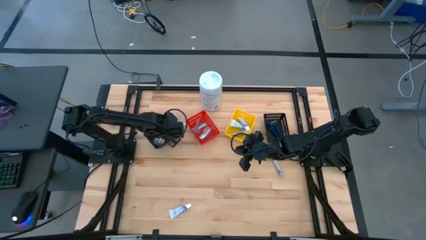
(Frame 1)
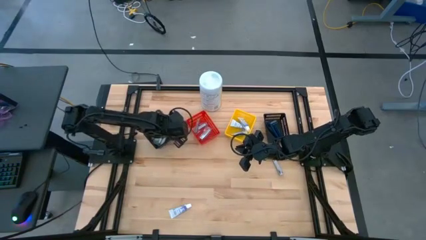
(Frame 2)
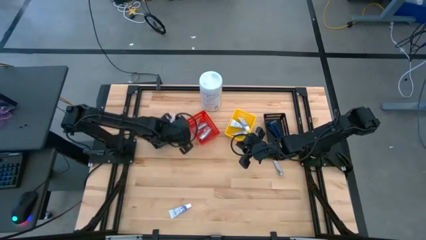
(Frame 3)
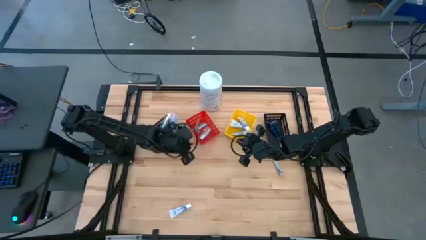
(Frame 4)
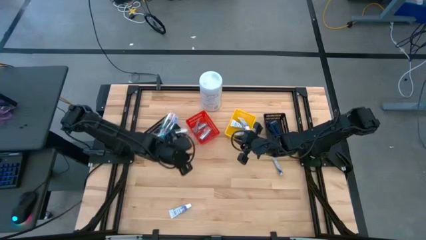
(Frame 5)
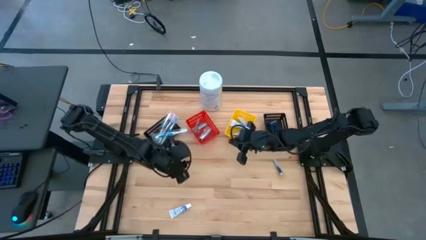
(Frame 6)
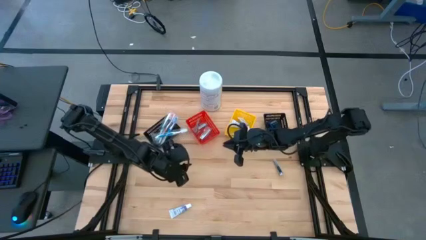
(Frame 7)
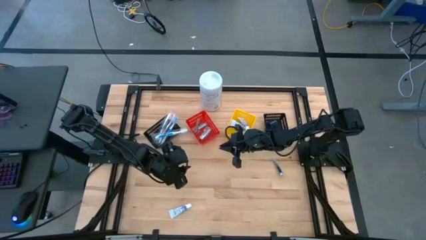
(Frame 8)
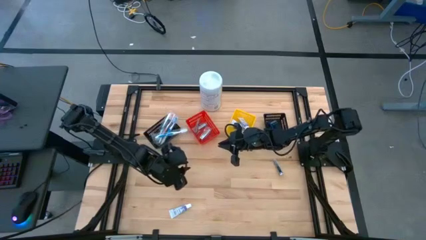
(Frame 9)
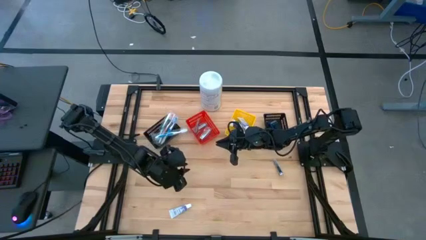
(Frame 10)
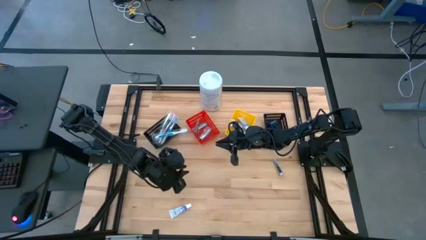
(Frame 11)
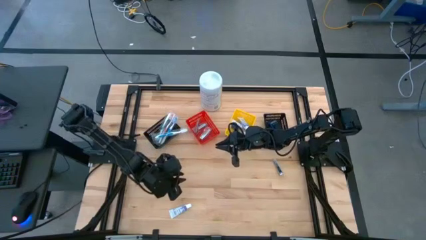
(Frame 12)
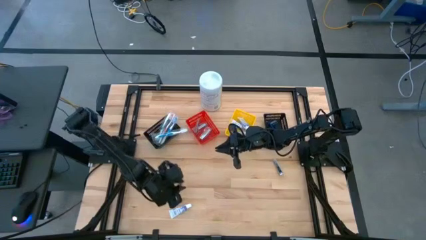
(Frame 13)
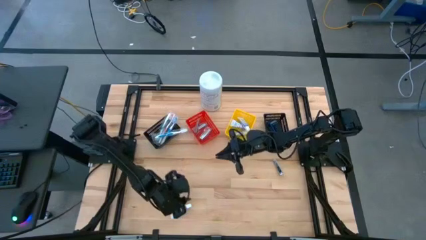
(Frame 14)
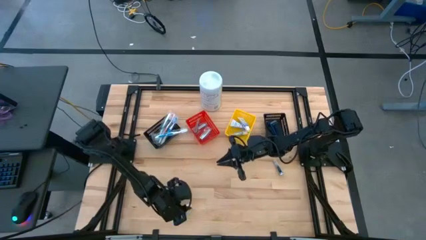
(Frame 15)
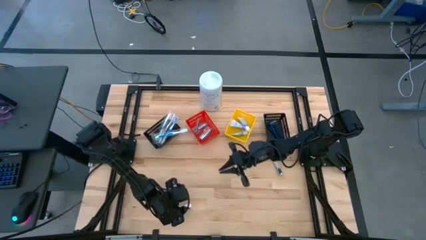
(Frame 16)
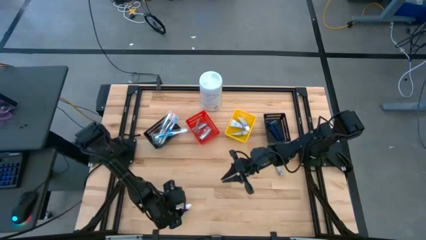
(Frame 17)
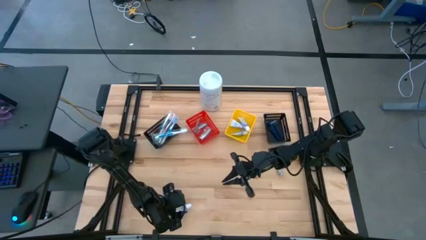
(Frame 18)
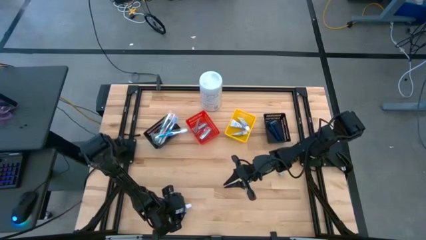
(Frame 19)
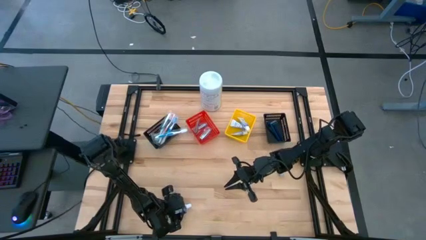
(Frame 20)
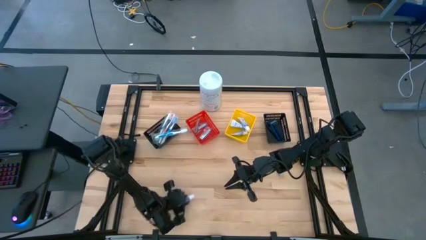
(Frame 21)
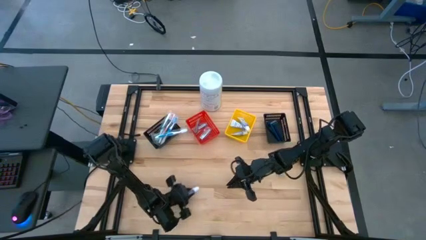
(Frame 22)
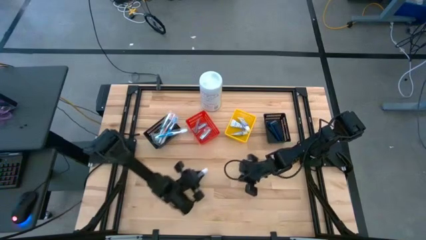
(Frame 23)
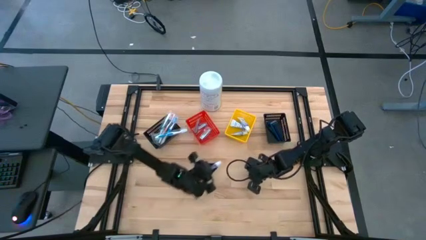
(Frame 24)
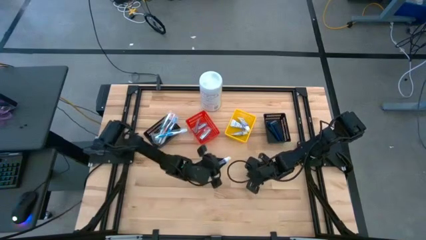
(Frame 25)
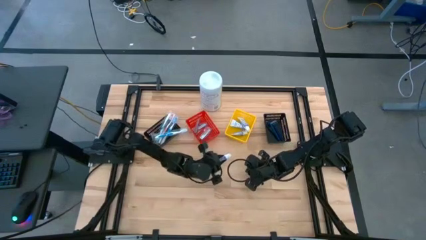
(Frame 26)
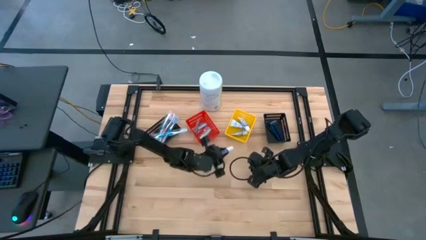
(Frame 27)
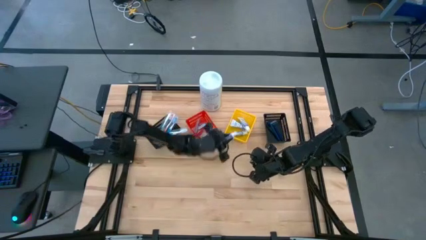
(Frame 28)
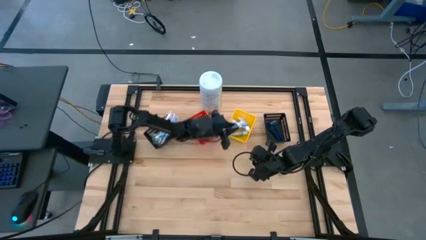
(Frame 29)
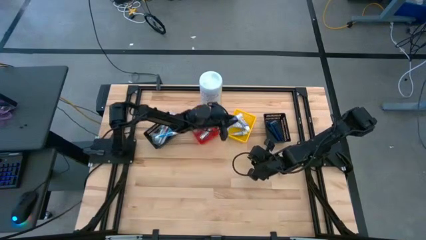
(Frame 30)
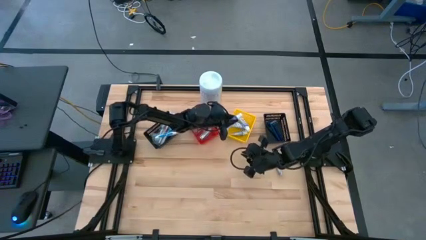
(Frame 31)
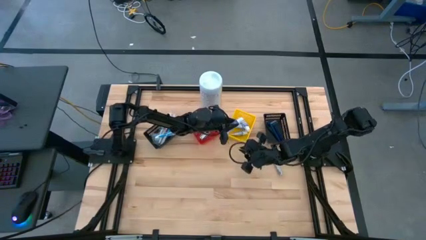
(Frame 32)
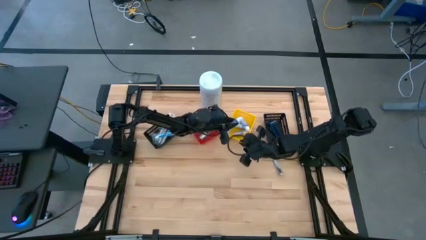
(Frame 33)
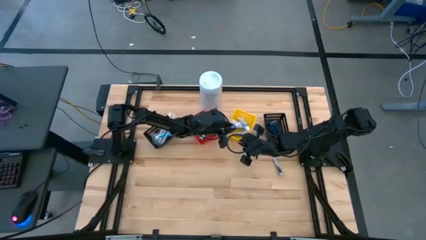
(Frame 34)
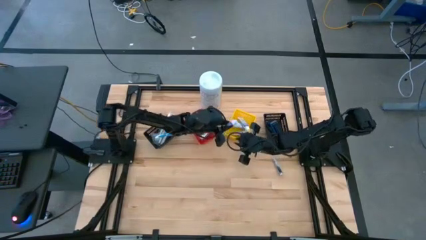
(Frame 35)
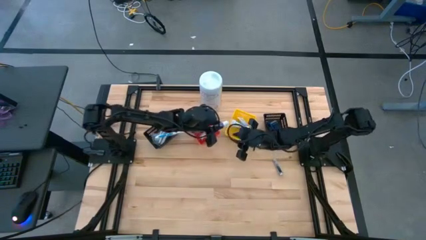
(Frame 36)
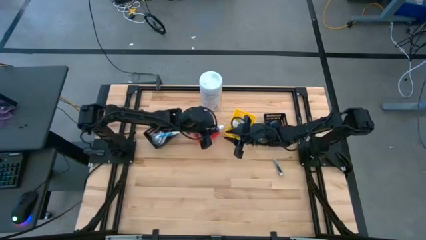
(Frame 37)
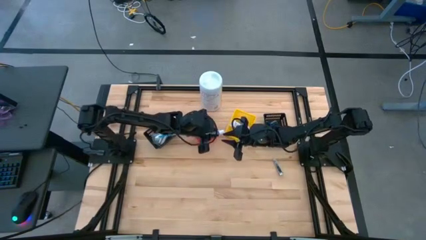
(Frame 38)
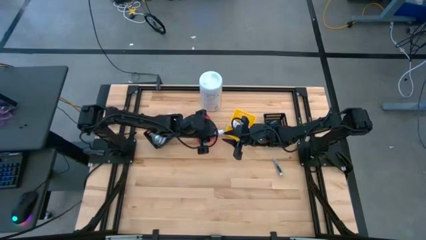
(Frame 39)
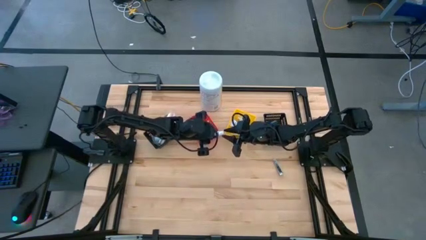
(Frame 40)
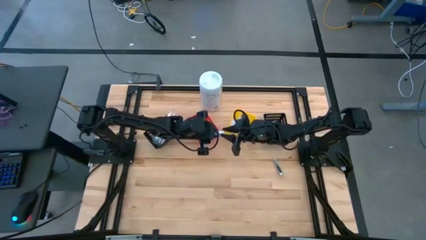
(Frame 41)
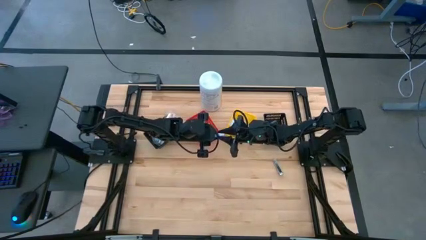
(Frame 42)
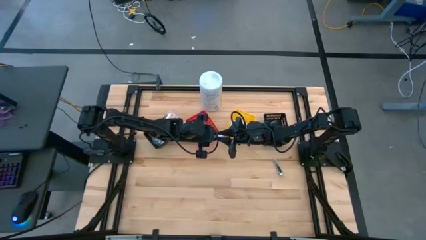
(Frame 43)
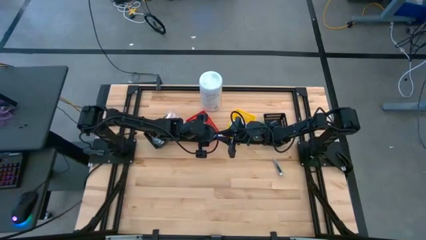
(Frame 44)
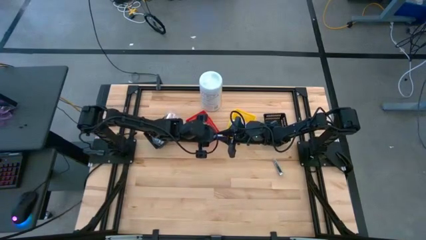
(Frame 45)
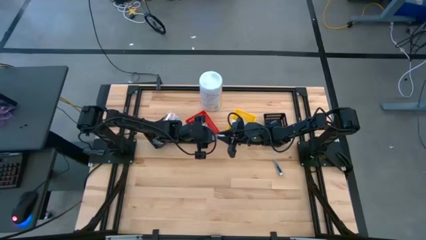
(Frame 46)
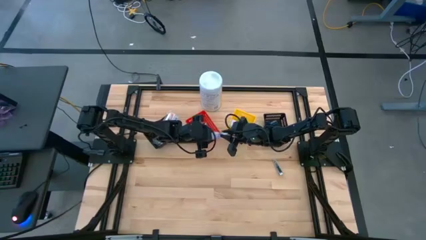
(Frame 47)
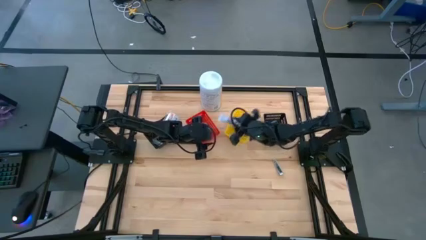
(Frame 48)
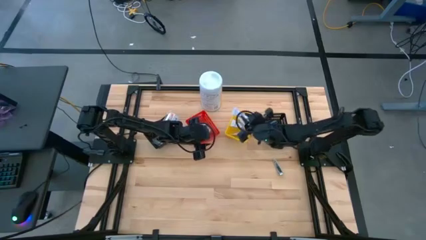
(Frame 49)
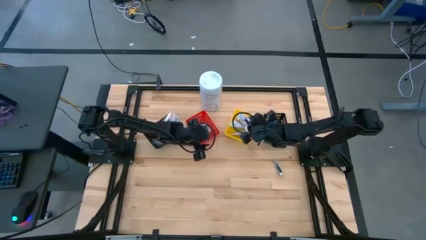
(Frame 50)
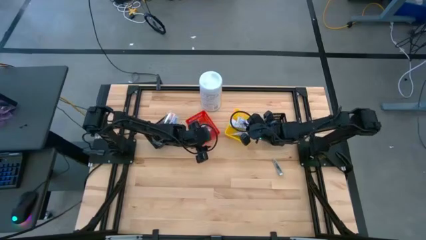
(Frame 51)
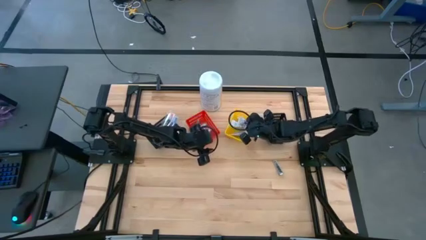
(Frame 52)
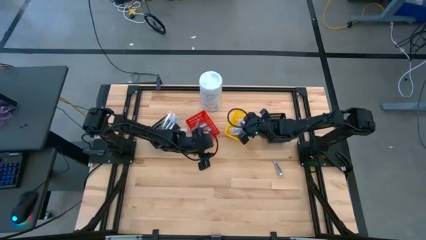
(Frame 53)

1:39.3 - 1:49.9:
Task: Pick & Place Travel size toiletries
Put the white toothpaste into the yellow basket

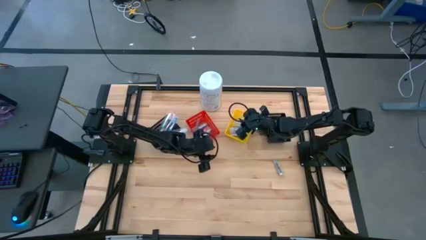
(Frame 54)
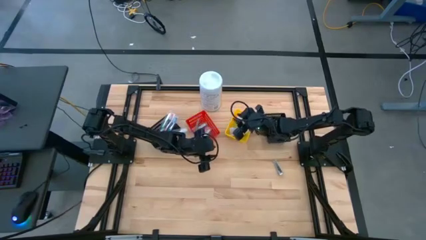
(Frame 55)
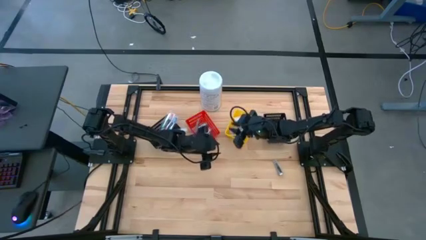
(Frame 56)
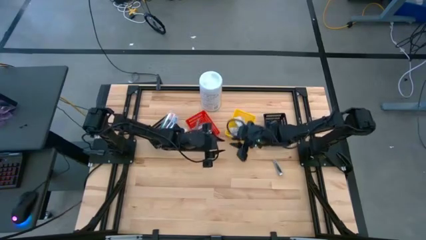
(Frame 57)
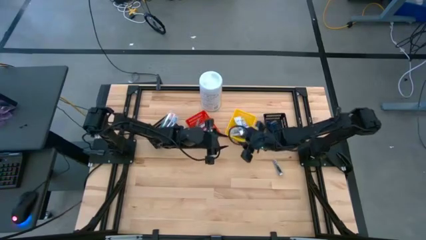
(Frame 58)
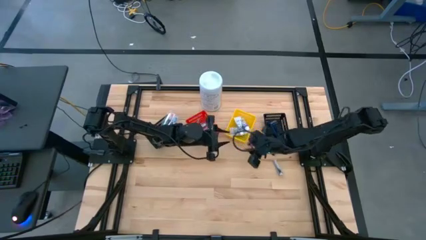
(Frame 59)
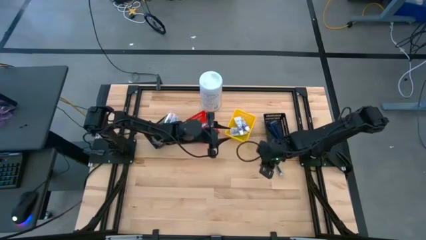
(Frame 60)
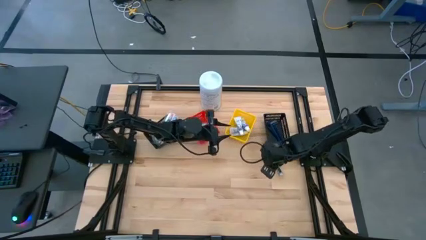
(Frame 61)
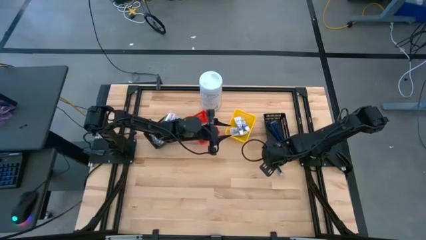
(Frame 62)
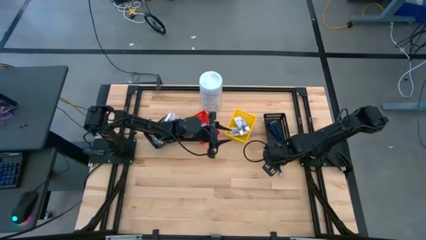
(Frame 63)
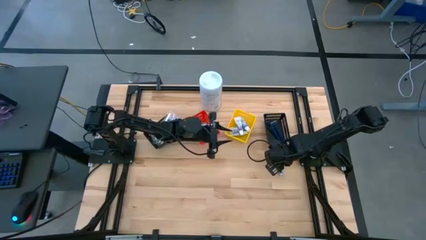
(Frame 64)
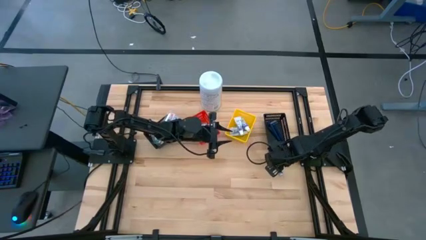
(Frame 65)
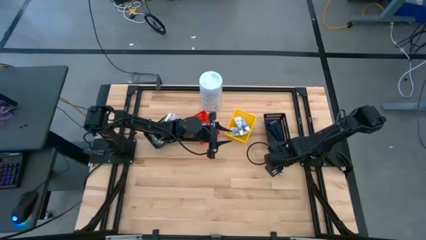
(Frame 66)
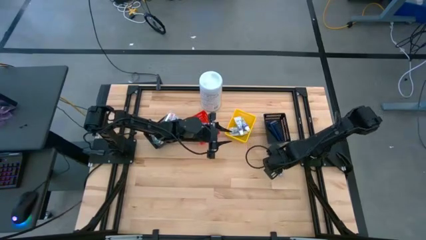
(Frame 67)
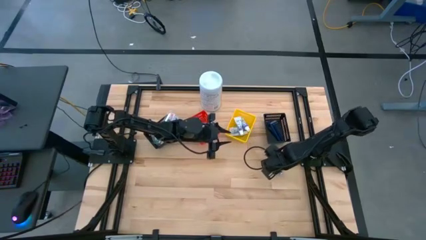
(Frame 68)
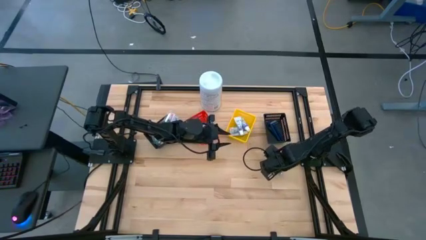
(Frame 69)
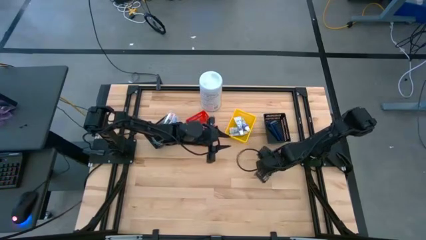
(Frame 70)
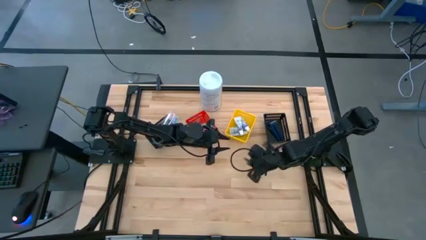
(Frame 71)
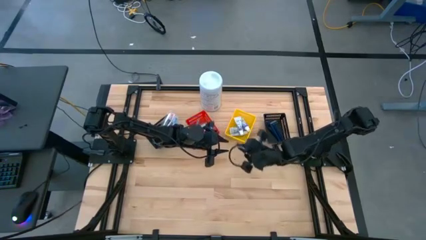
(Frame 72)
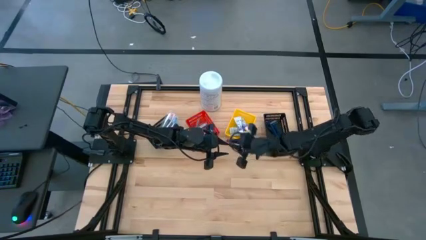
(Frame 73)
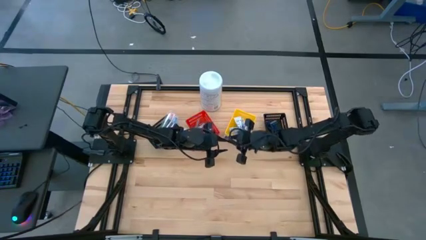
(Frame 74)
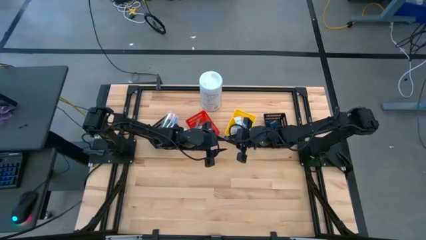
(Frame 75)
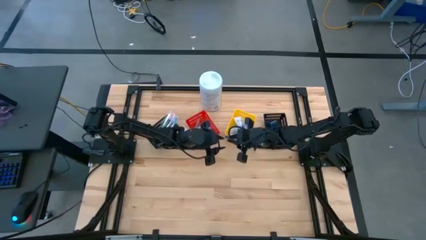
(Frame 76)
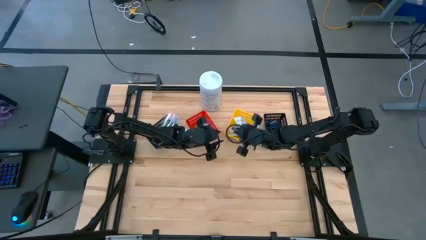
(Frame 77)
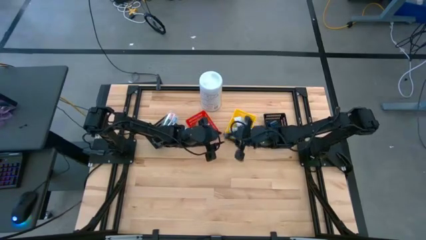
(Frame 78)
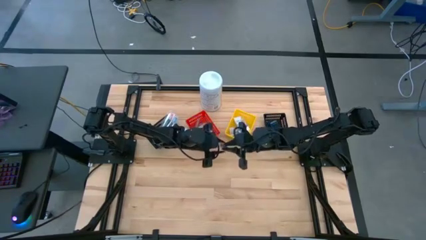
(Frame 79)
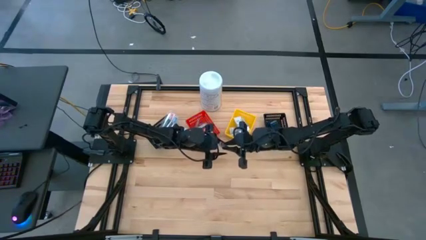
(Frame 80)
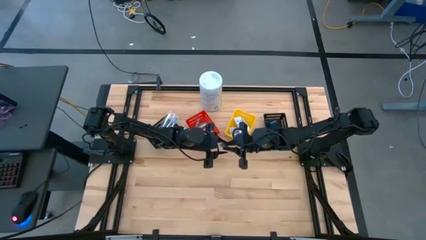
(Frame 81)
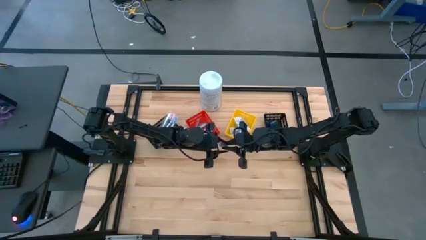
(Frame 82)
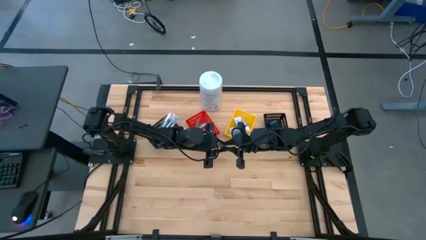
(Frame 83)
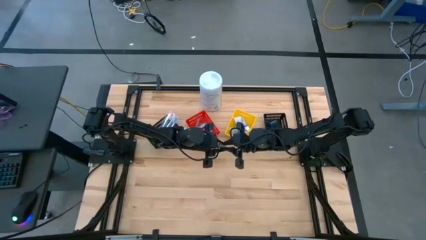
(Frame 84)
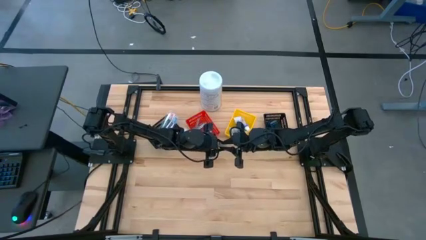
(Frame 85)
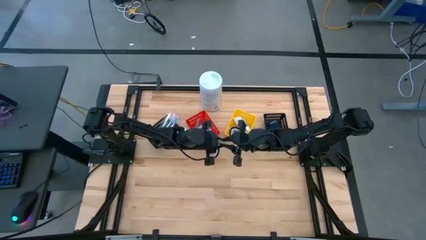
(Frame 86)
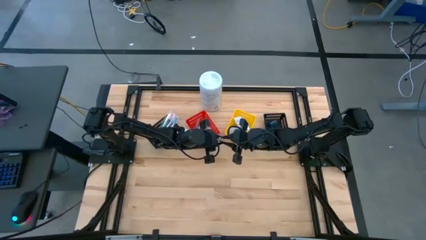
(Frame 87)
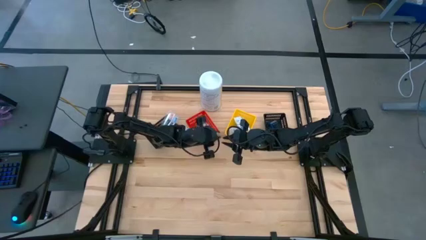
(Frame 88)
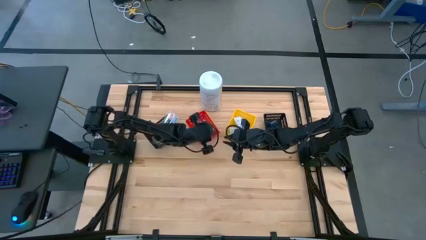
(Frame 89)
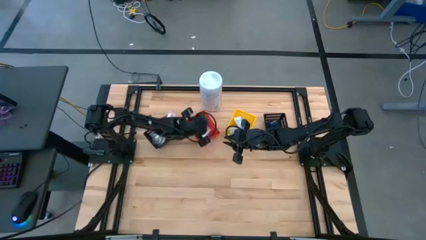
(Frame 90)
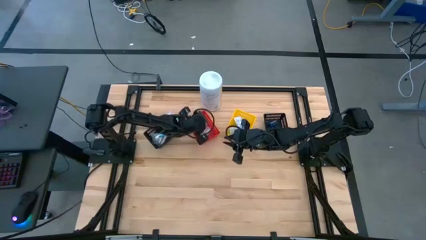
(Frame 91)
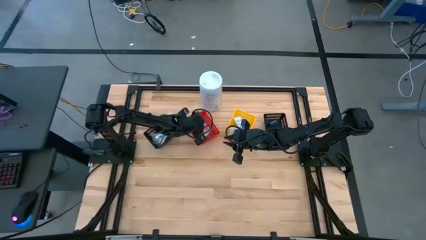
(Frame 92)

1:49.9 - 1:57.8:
Put the silver nail clipper into the red basket
